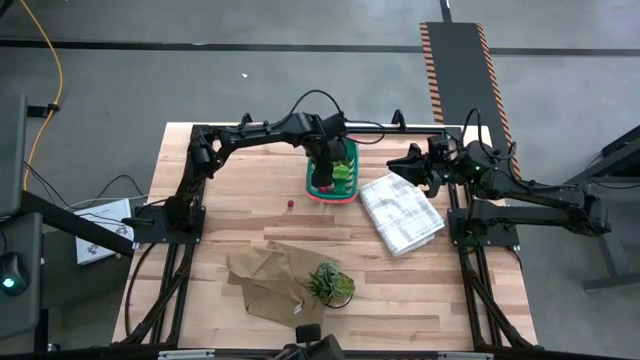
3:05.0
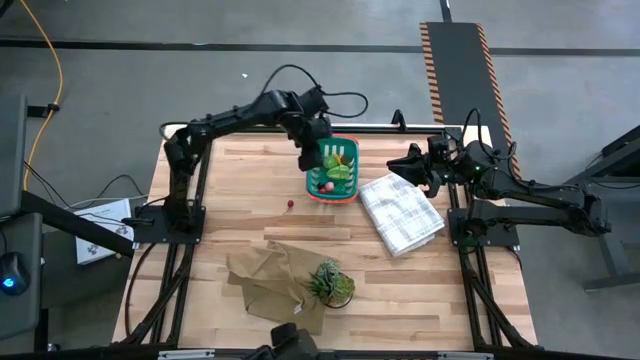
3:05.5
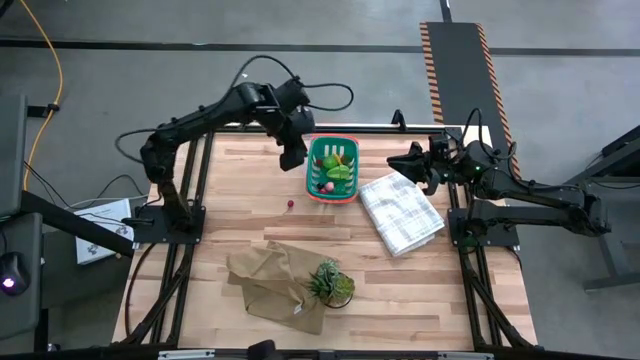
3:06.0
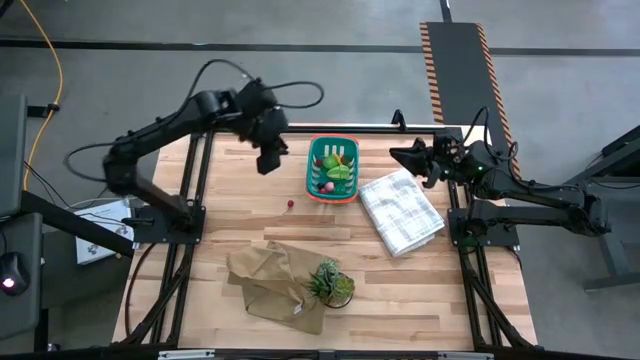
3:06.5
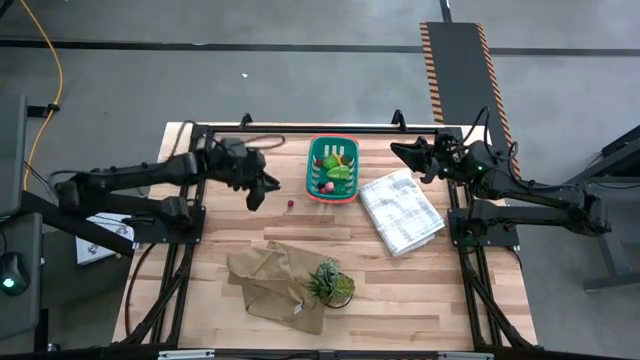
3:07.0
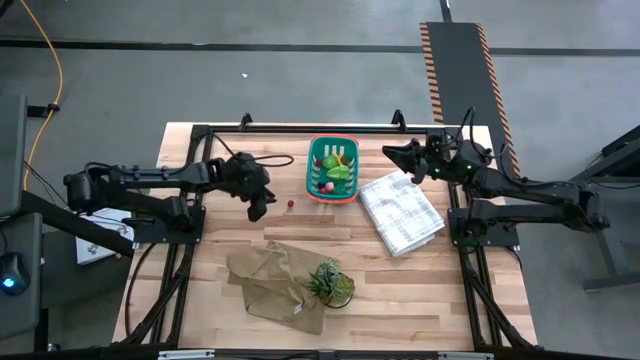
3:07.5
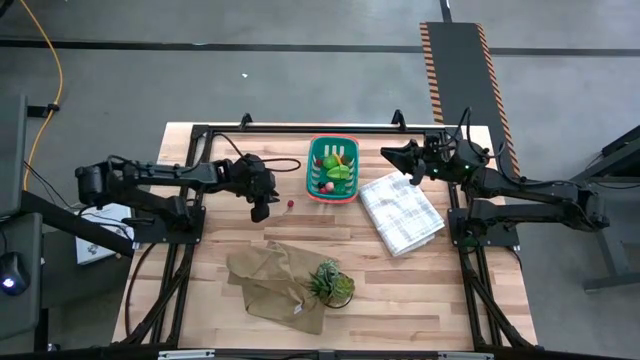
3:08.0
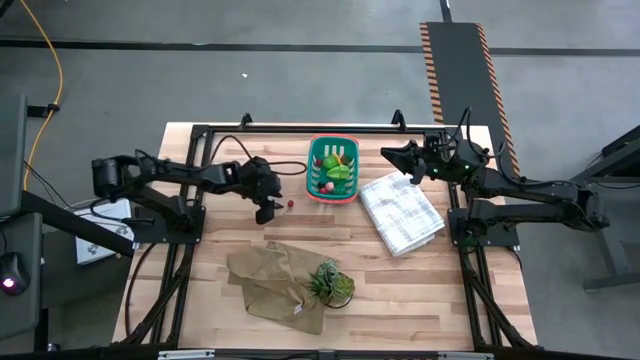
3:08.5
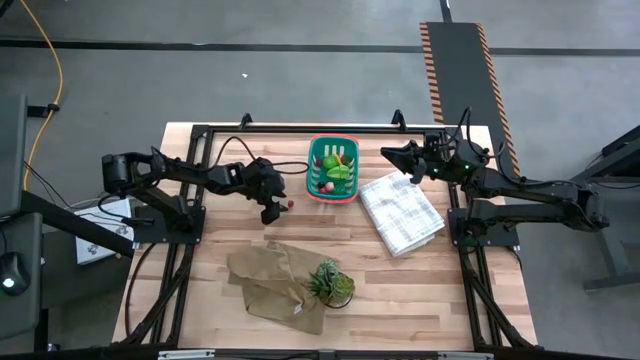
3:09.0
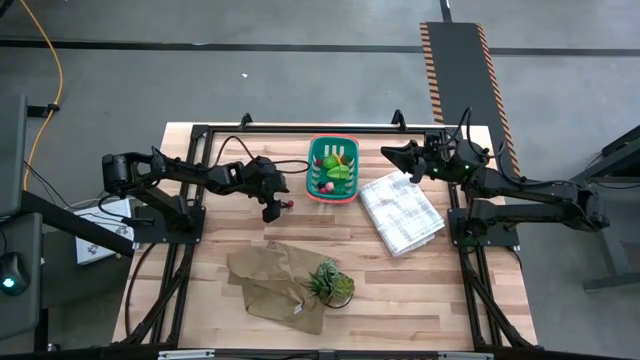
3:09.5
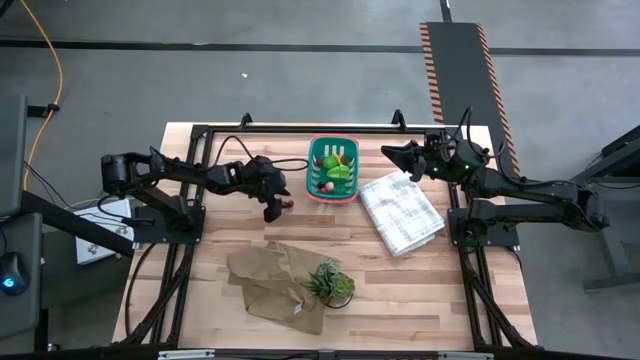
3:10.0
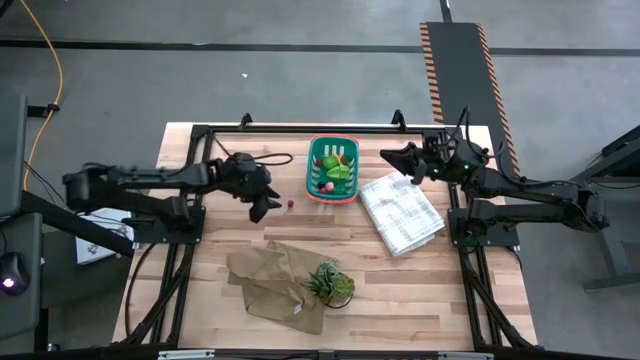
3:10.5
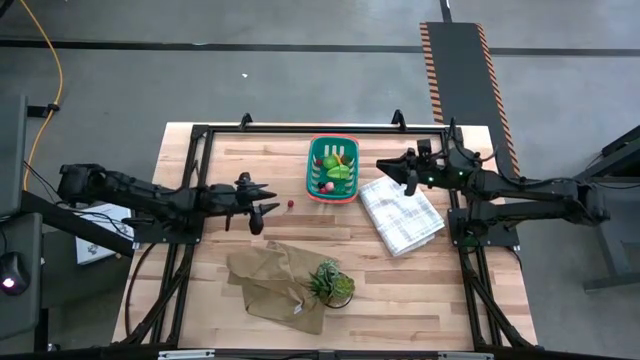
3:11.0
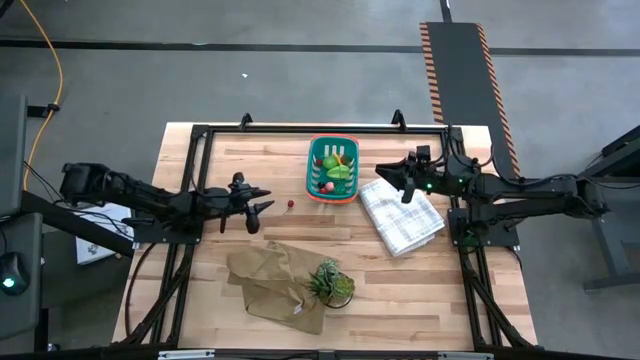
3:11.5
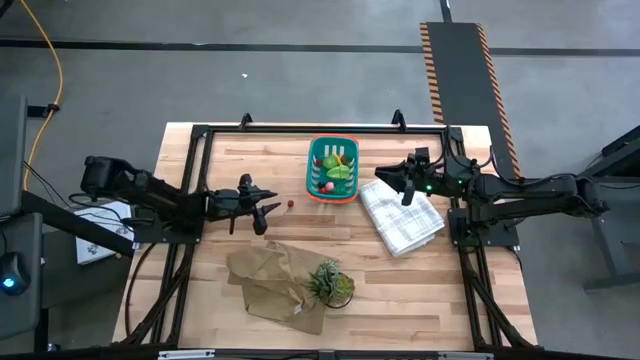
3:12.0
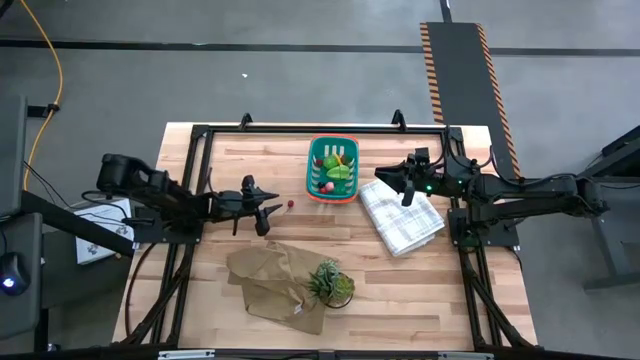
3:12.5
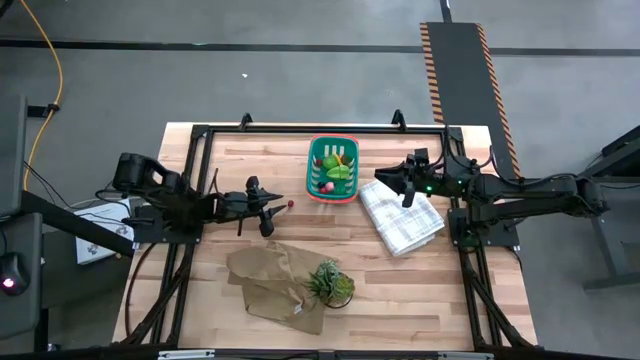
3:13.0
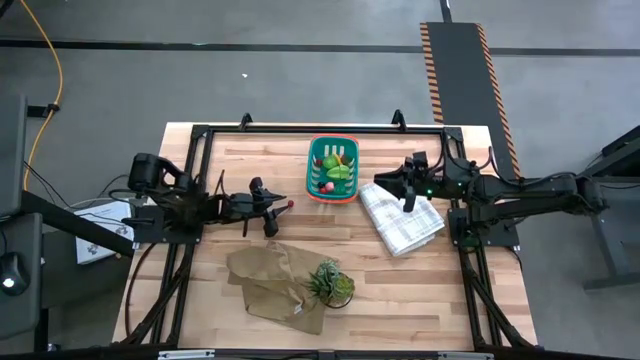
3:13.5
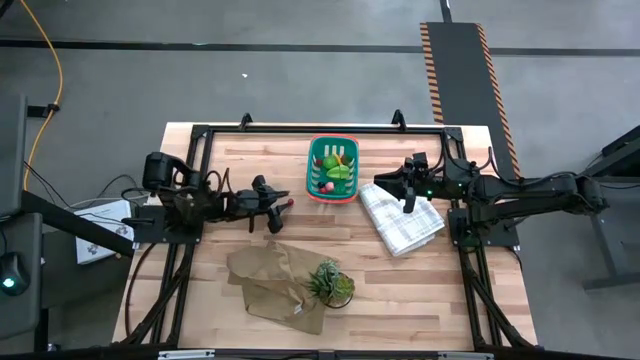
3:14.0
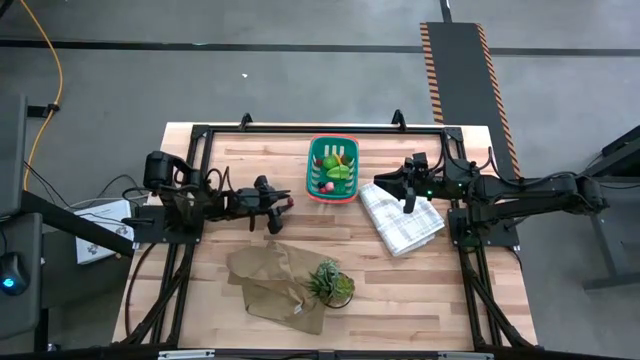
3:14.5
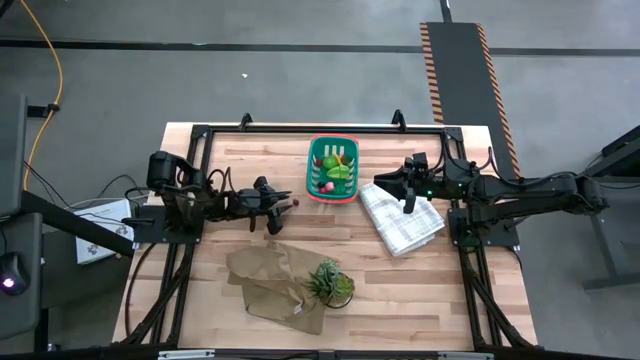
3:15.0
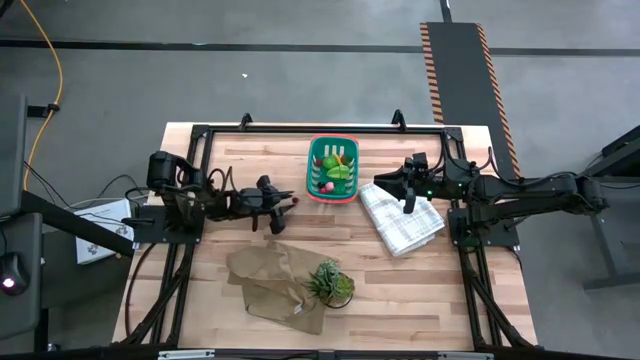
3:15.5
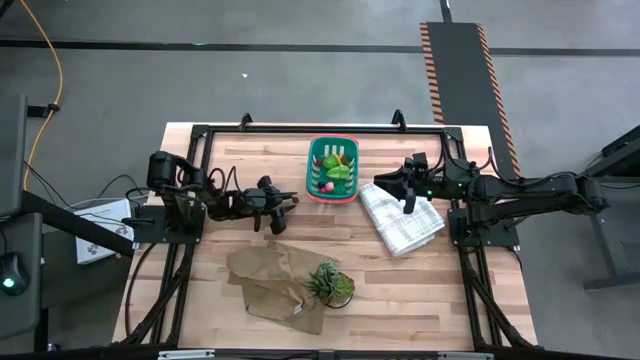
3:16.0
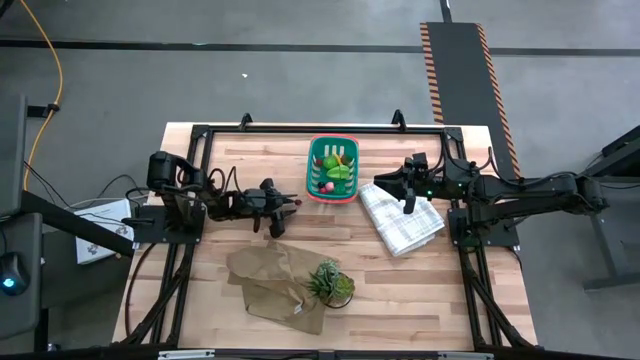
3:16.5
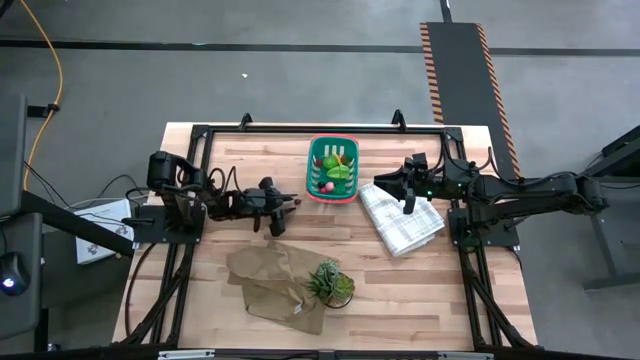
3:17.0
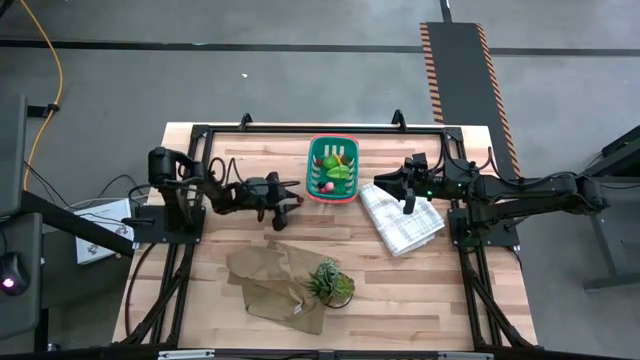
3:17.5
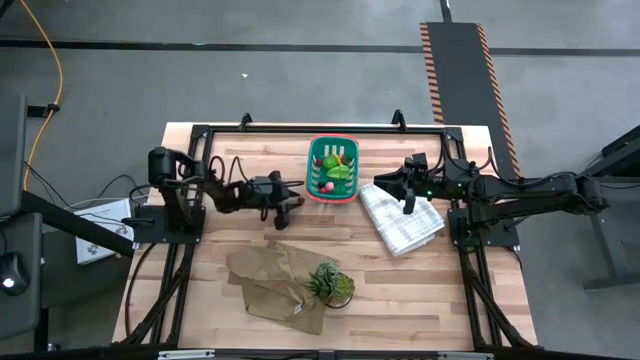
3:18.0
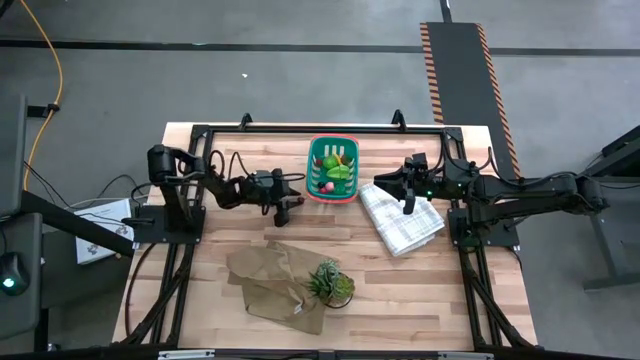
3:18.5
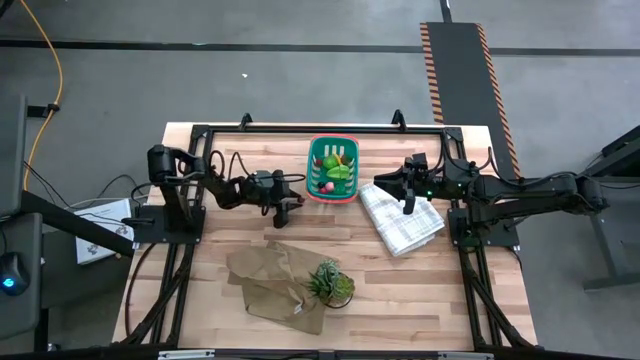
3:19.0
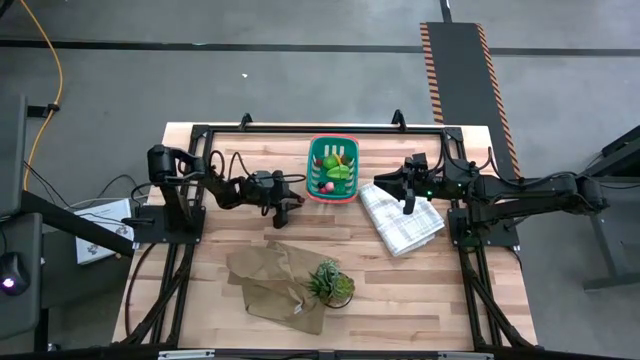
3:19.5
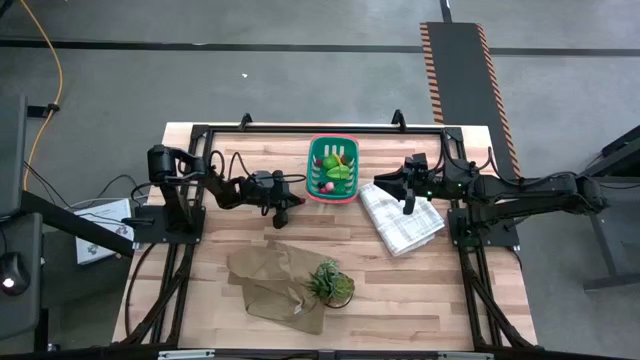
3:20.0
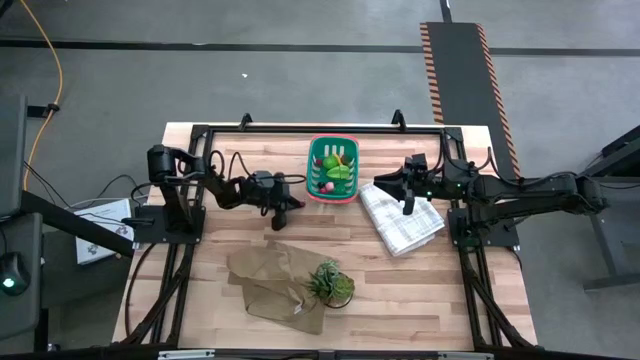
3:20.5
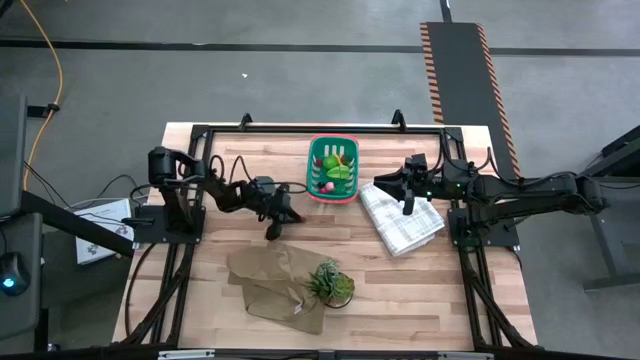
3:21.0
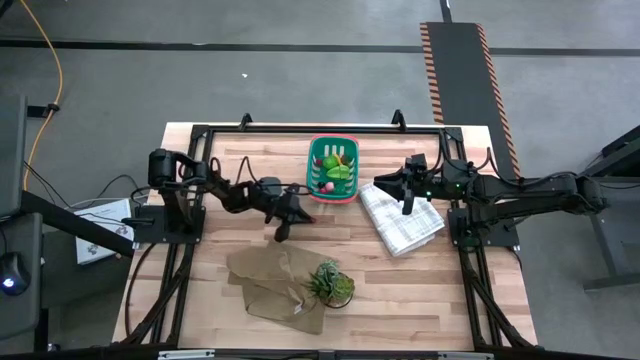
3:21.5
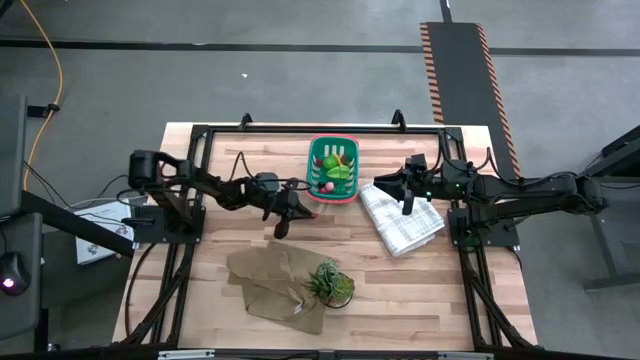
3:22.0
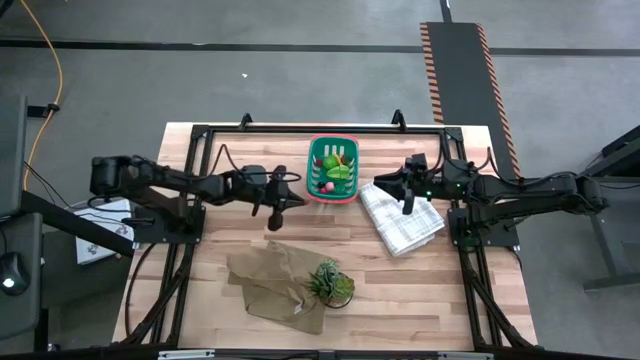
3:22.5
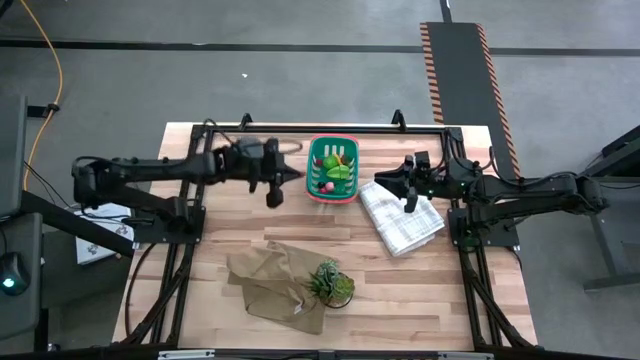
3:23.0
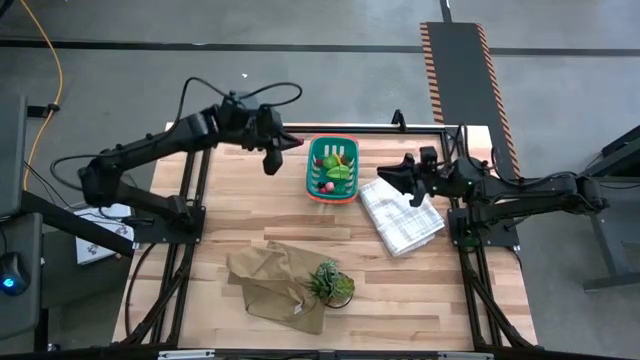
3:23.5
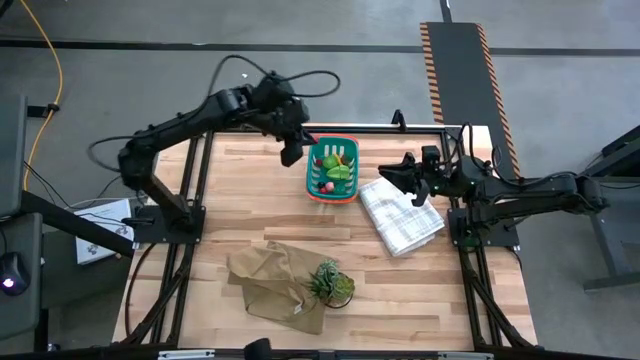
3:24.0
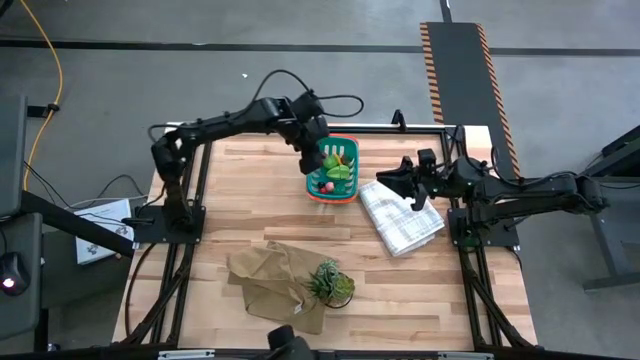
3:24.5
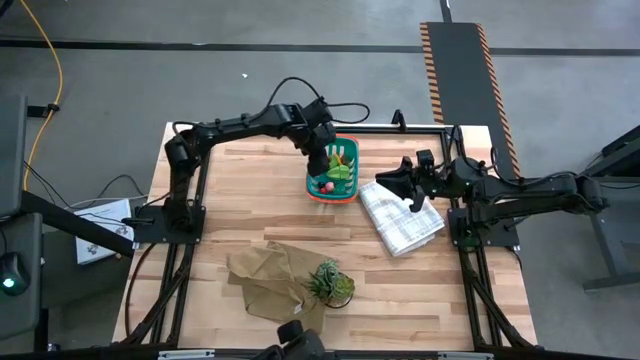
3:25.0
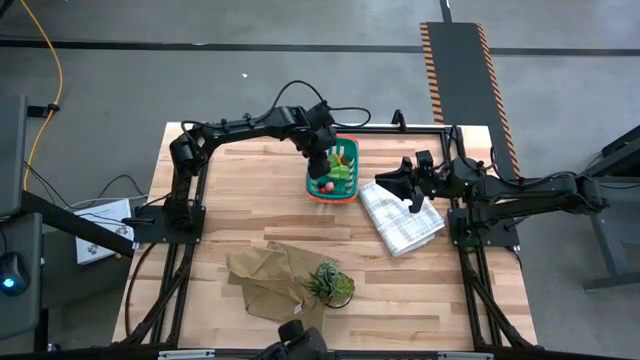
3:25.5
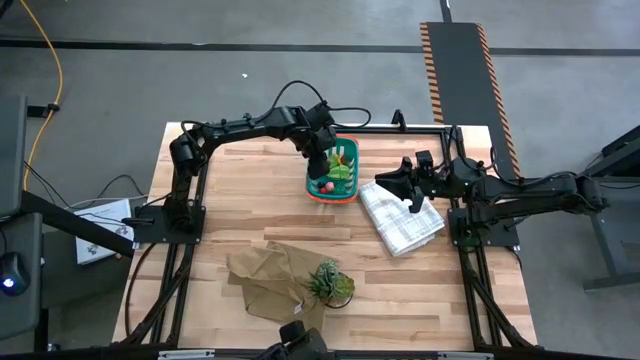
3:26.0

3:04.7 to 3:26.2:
Task: Pick and placing Produce into tupperware
Put the red cherry into the green basket
